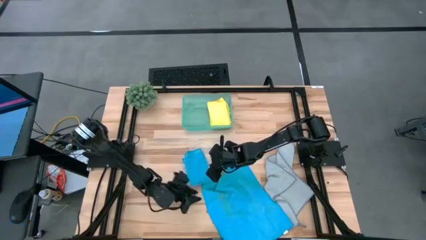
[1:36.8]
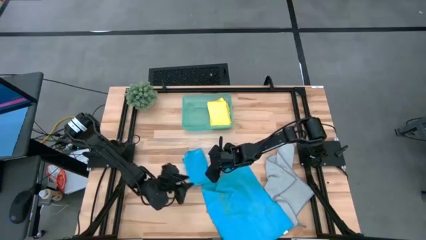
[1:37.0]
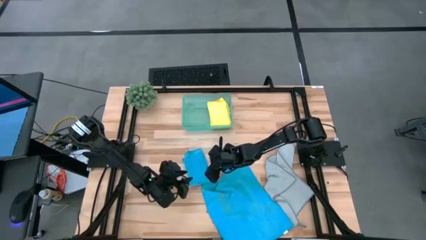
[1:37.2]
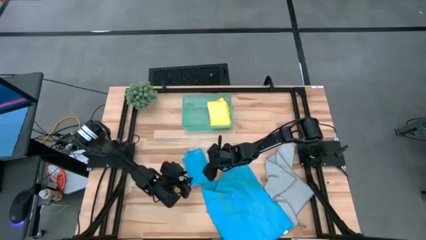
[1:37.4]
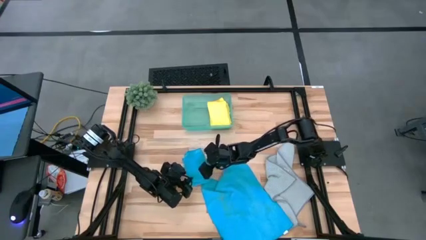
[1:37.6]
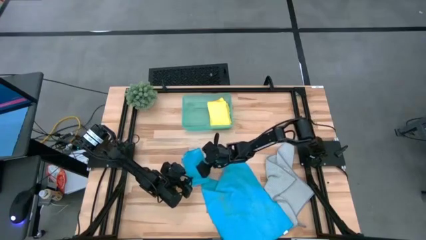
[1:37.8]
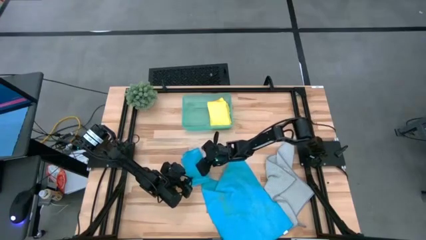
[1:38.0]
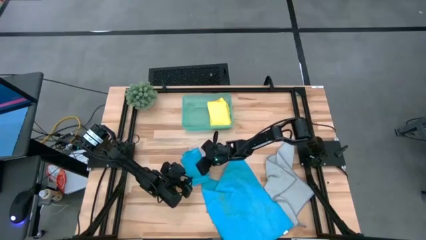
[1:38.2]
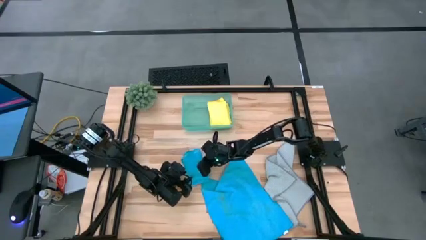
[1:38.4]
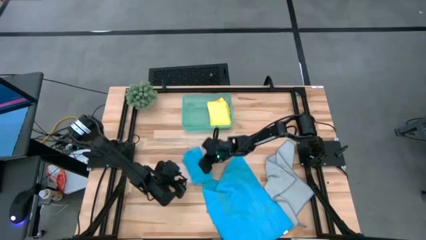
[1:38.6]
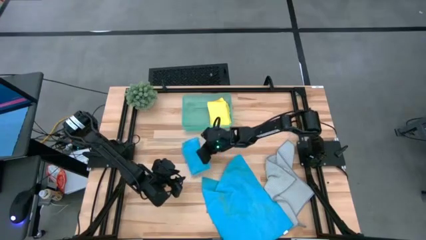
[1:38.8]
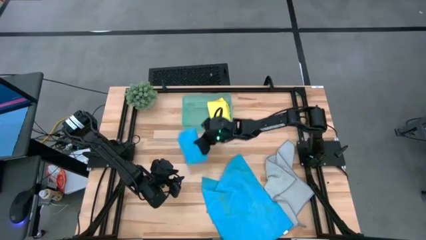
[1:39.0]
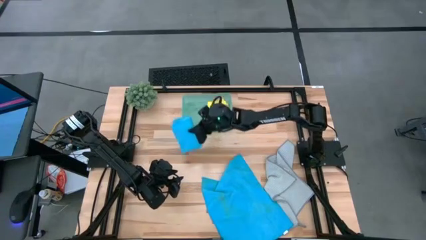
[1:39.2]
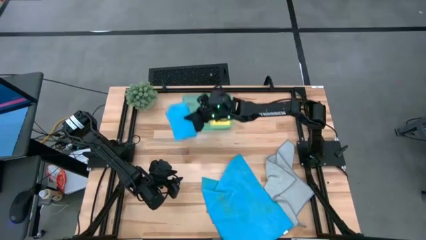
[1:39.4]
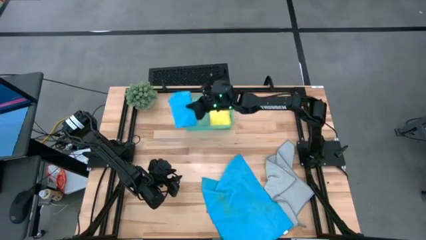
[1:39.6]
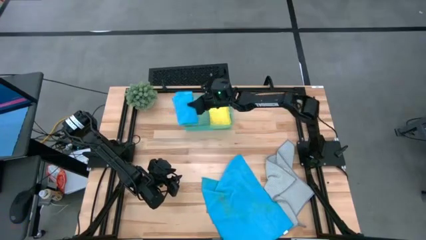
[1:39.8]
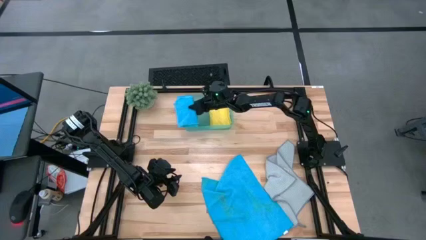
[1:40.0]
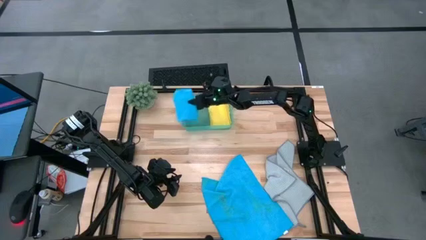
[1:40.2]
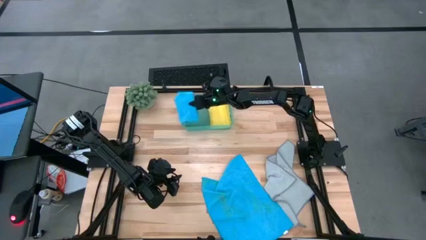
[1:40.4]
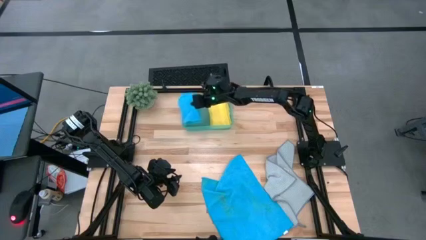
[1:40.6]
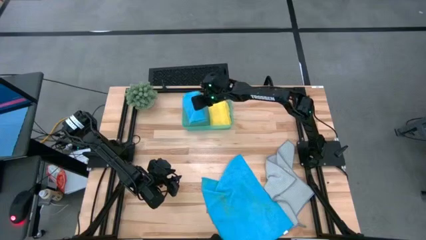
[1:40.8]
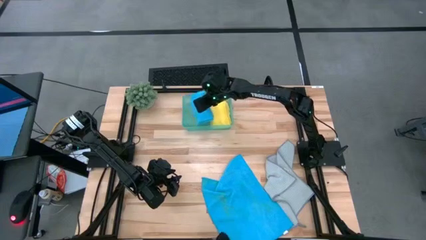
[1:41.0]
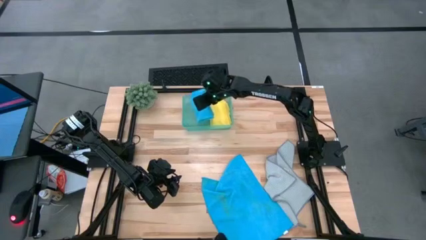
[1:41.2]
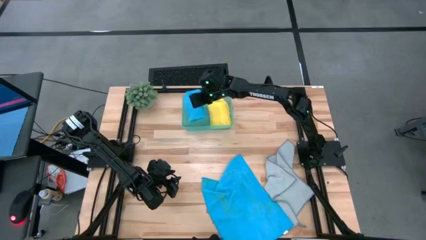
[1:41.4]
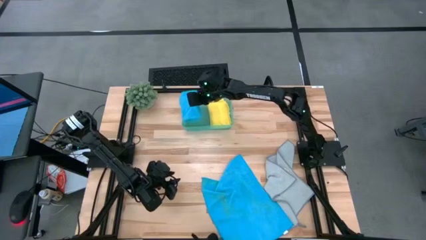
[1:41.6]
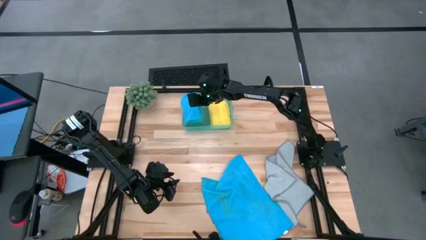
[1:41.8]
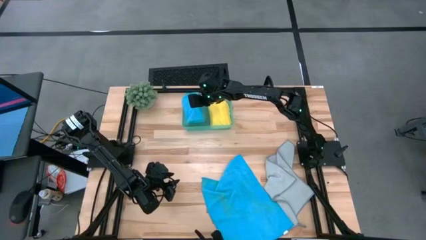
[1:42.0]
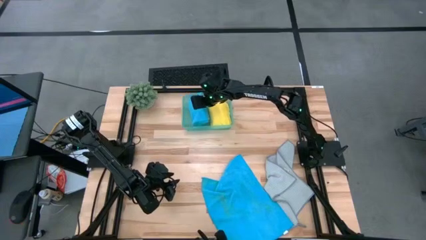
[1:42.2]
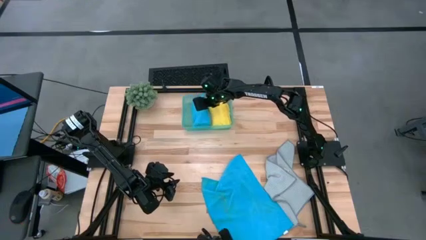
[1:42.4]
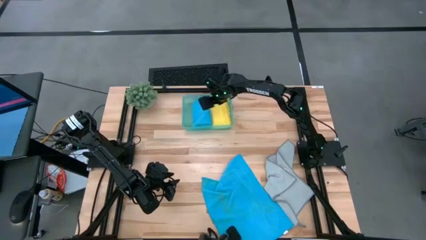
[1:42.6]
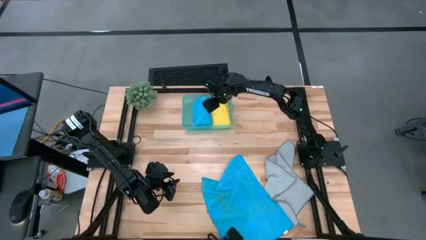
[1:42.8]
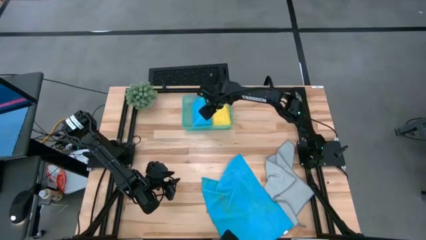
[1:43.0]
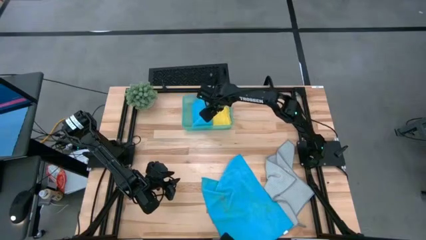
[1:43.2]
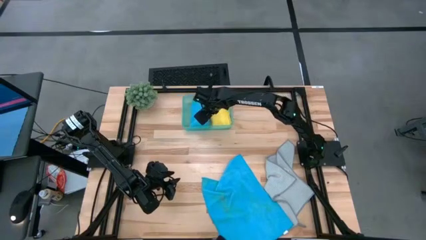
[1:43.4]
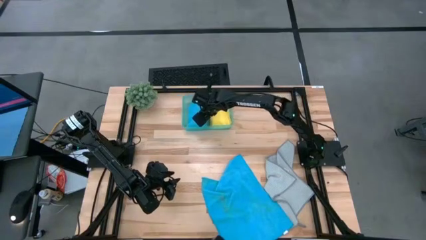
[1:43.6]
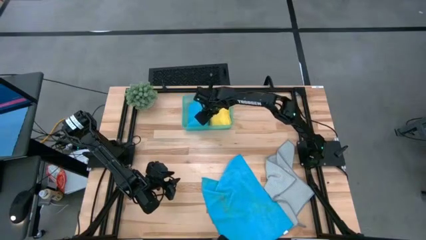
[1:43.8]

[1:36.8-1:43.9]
Task: Fold microfiber towels
Put the left blue microfiber towel into the bin

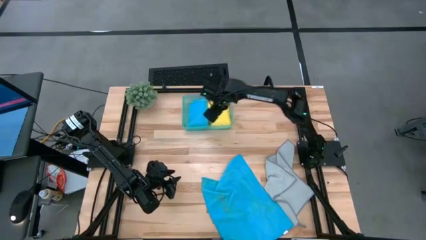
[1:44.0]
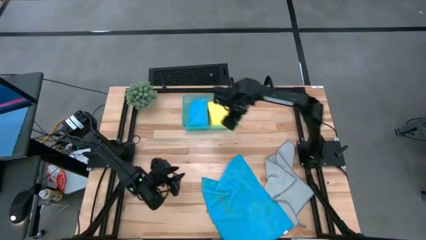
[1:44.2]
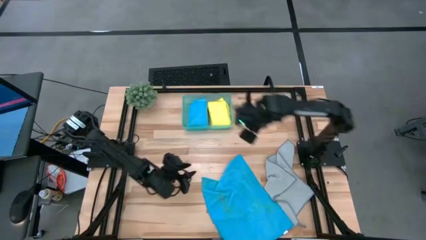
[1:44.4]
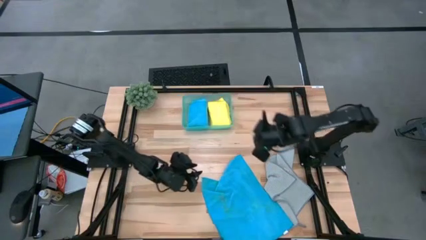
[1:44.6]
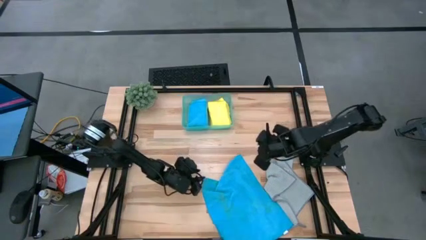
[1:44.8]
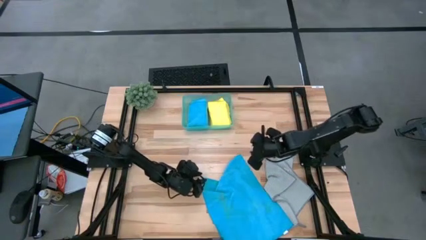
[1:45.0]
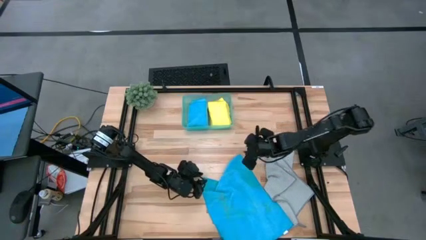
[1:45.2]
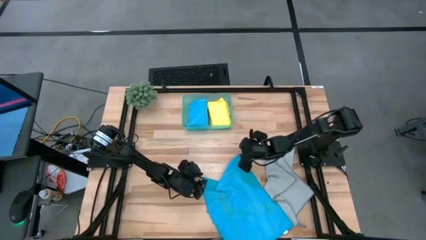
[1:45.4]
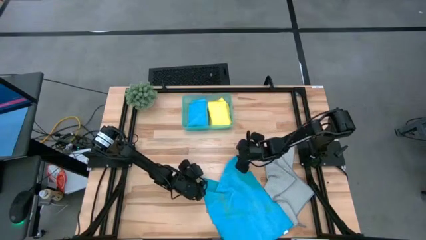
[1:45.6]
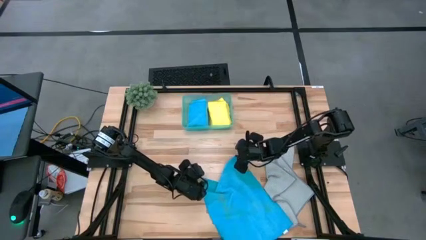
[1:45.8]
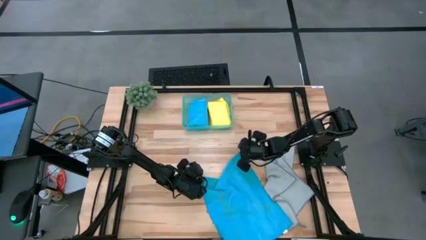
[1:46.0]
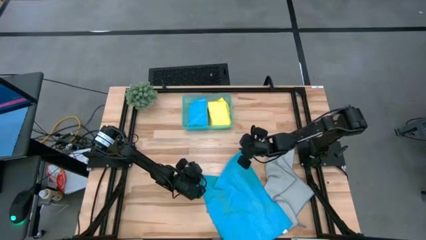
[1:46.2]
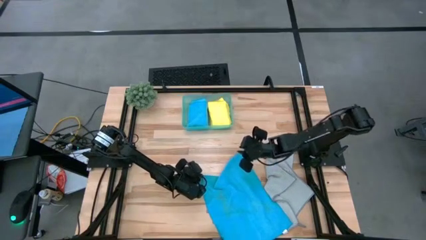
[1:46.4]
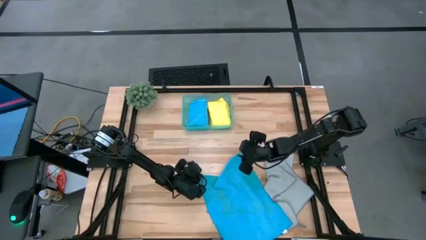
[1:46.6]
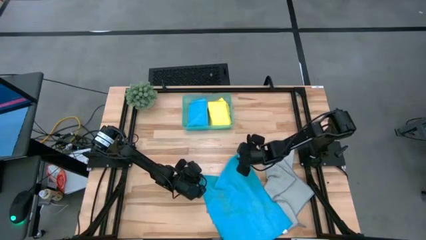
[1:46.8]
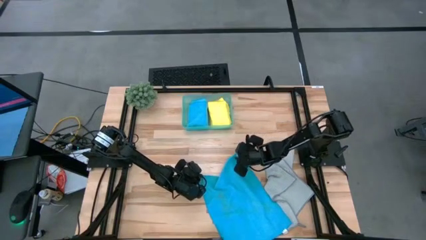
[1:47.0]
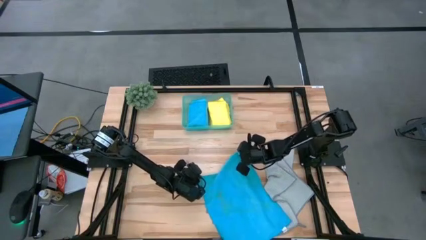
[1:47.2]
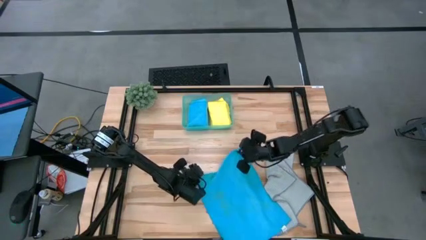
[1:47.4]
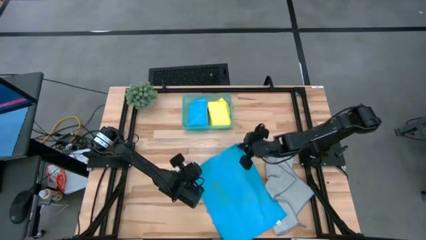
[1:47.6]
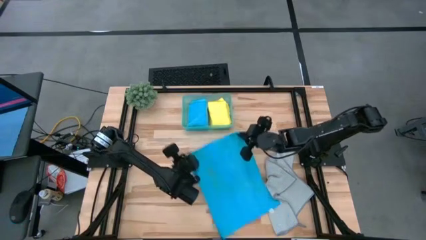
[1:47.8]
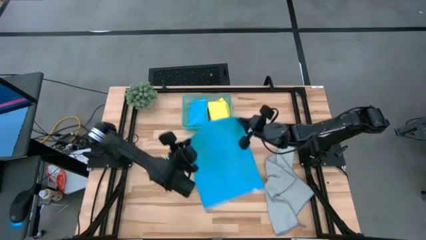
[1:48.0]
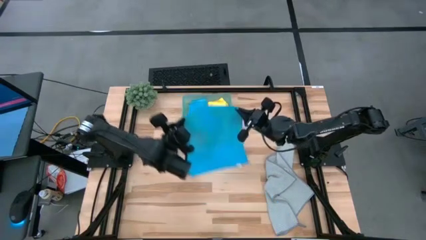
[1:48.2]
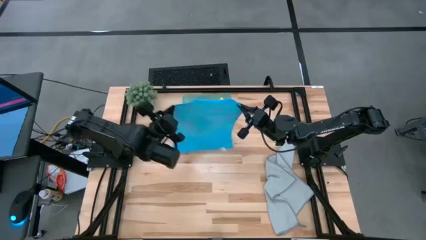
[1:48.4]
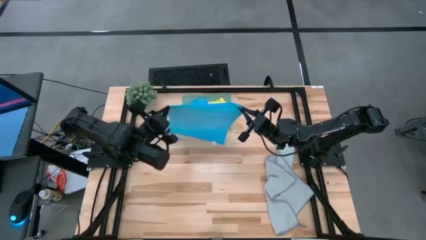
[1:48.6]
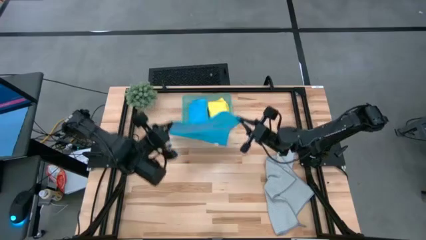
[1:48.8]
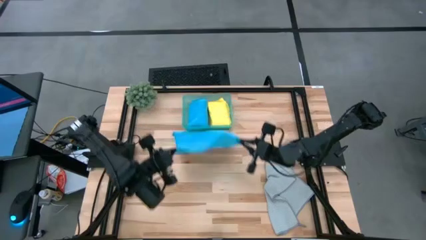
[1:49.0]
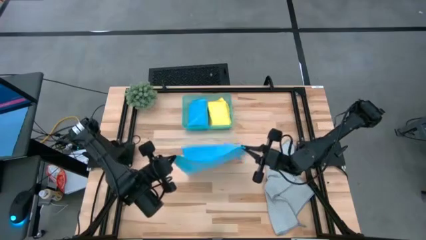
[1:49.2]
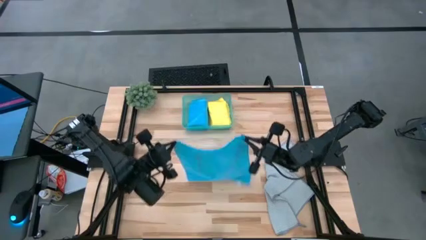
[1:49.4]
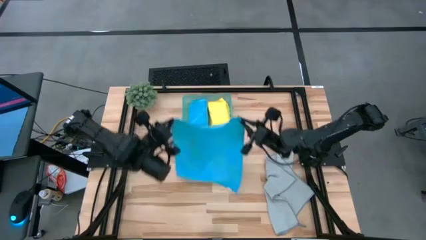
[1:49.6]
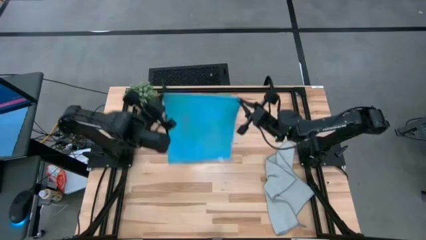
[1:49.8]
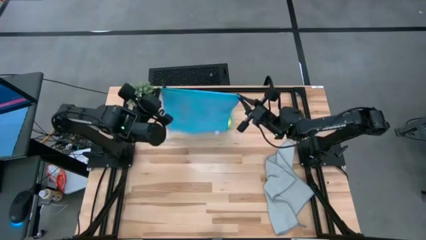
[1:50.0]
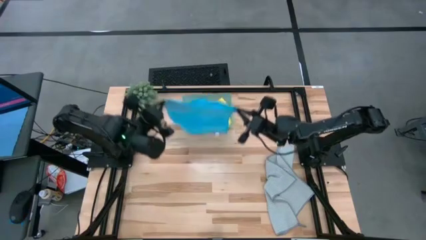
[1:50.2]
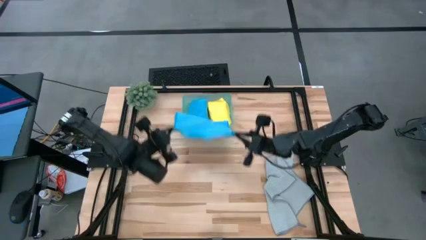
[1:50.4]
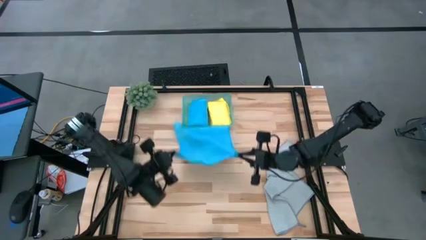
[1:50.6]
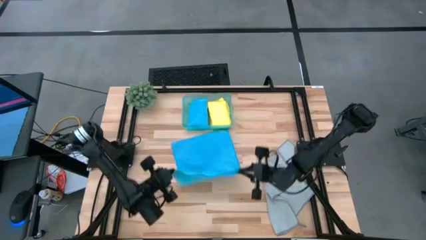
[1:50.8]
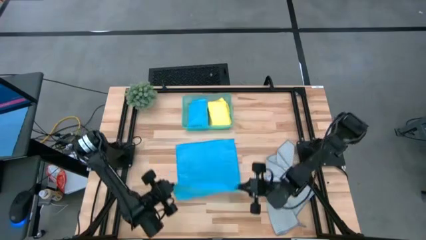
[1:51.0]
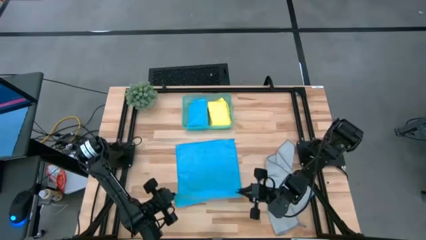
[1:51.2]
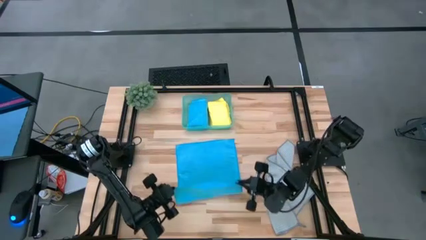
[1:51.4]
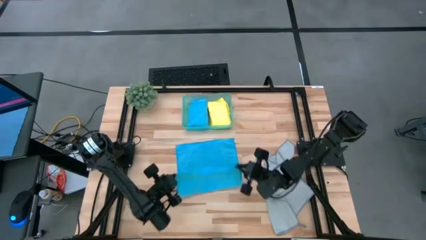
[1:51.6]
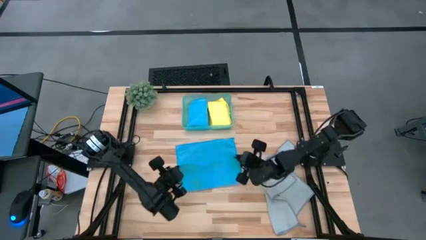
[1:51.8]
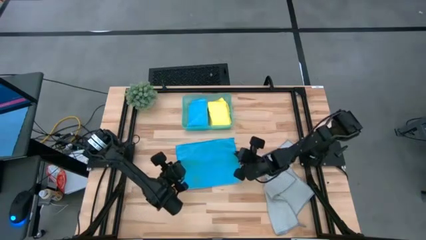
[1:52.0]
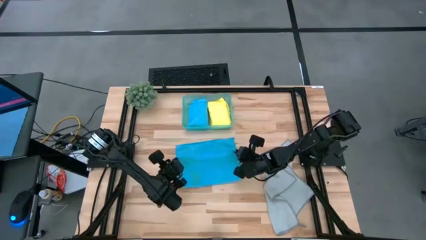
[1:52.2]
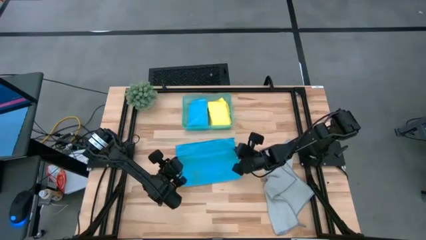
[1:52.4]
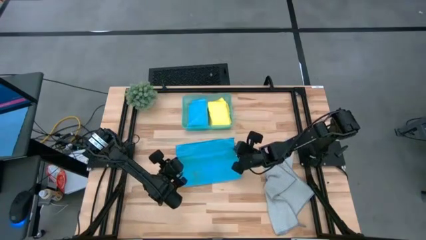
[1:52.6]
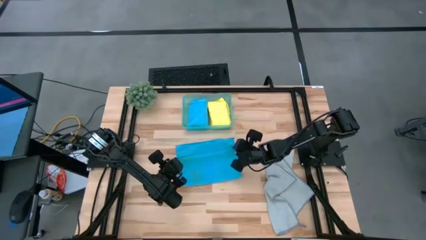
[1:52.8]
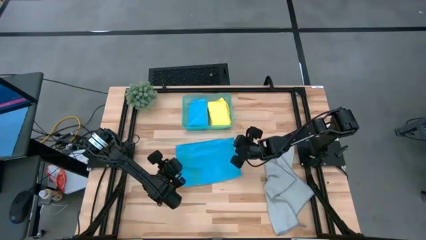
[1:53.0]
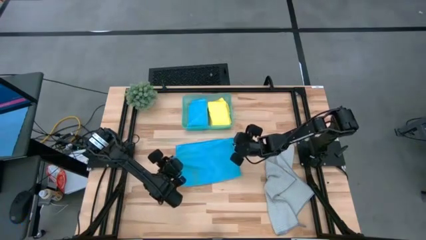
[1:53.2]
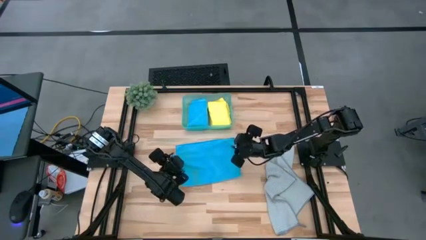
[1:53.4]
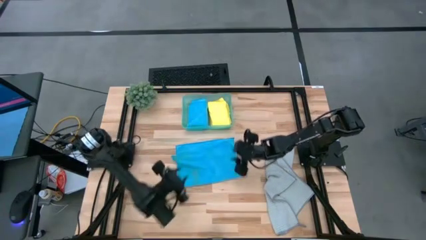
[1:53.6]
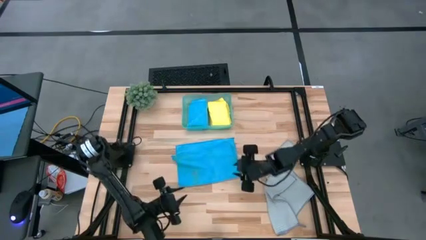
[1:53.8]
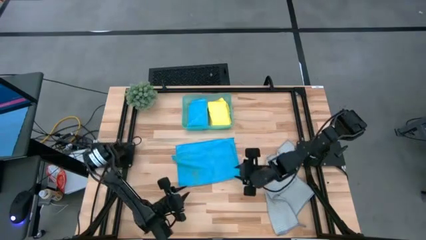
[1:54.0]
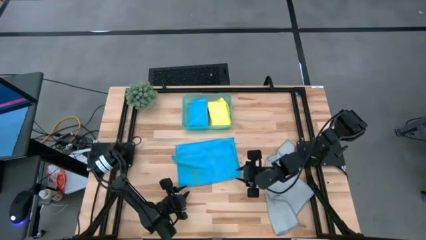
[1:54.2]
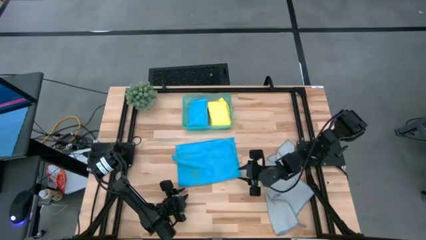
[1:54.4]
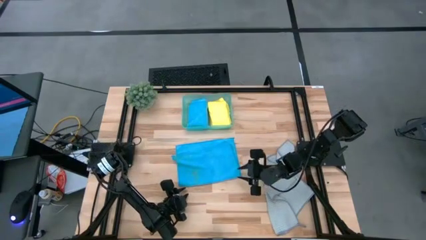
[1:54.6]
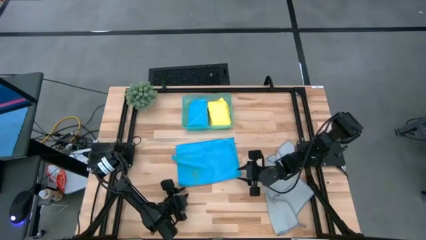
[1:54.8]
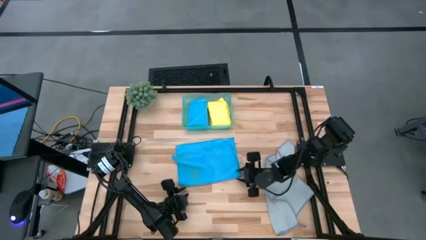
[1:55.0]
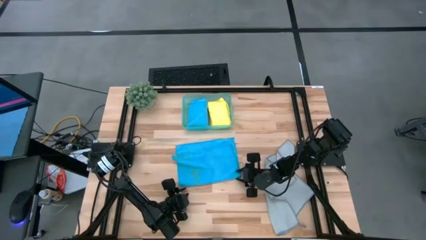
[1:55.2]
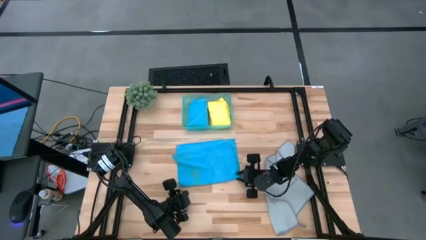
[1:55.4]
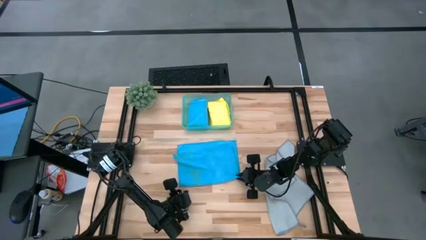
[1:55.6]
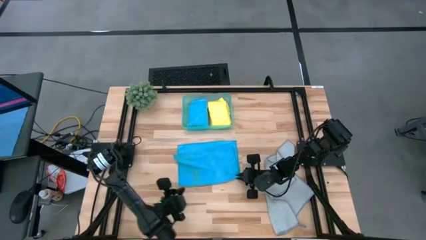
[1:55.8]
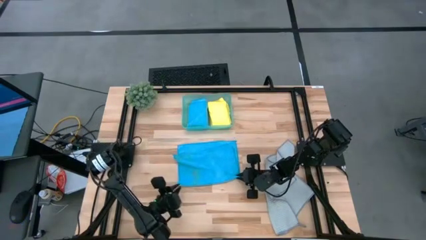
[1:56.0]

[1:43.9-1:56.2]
Fold the blue microfiber towel
